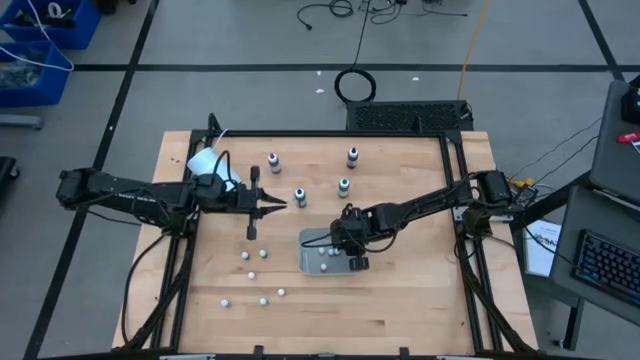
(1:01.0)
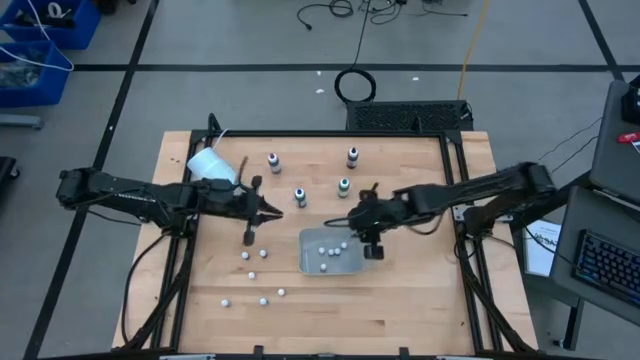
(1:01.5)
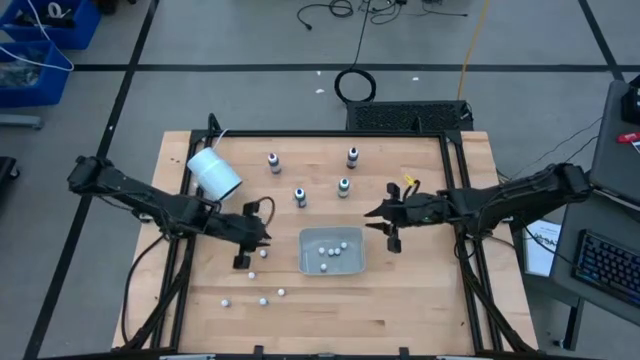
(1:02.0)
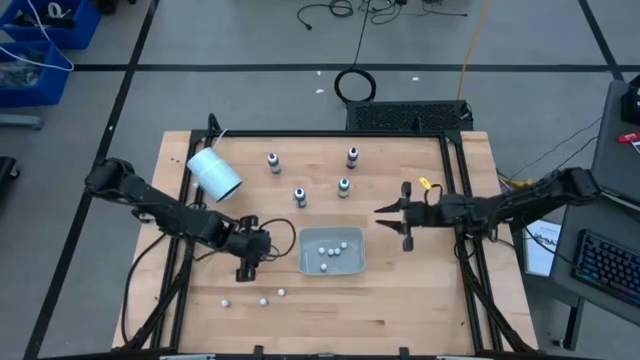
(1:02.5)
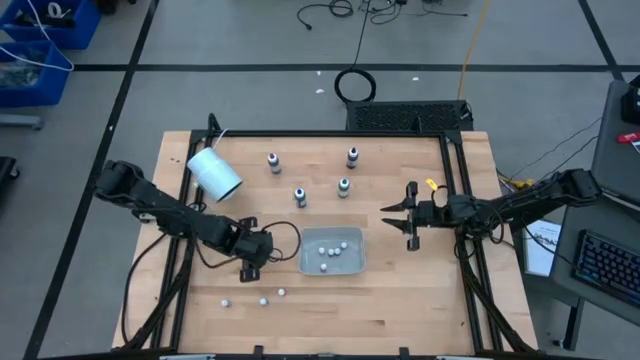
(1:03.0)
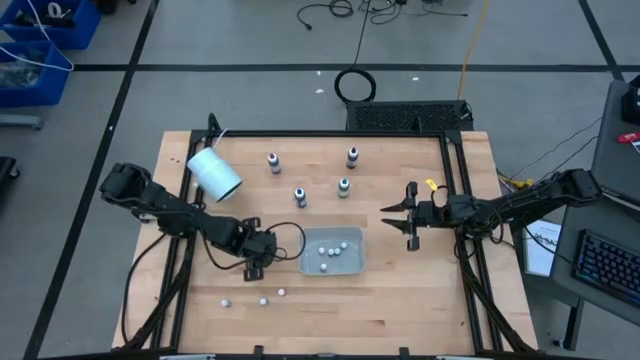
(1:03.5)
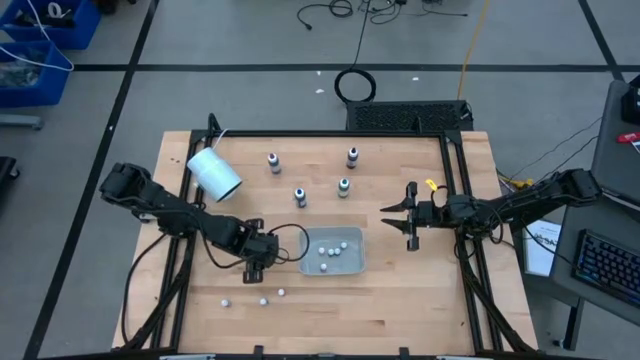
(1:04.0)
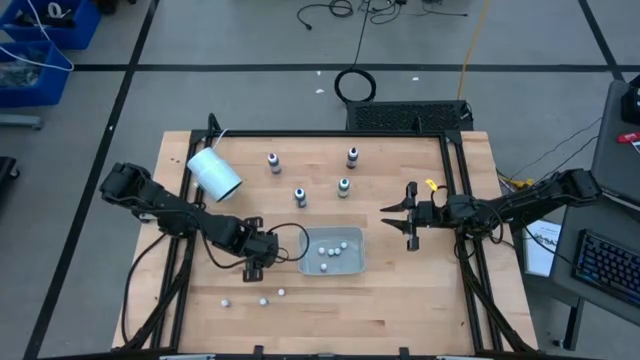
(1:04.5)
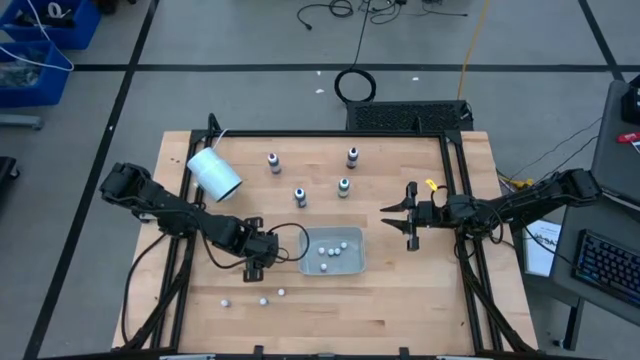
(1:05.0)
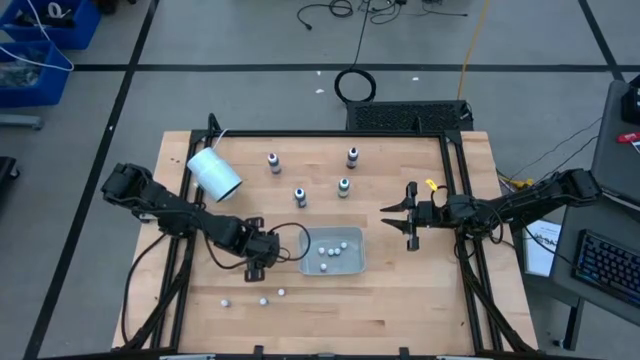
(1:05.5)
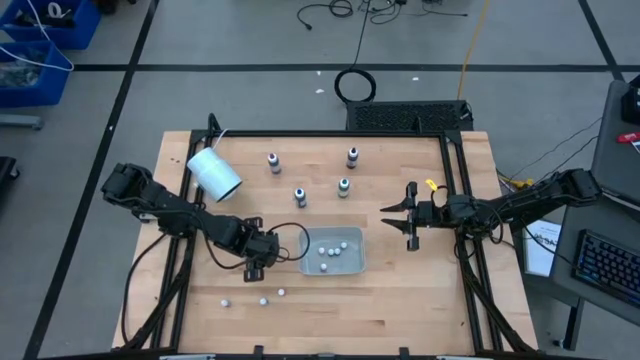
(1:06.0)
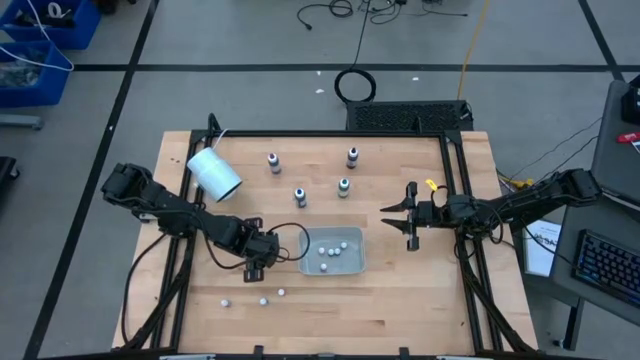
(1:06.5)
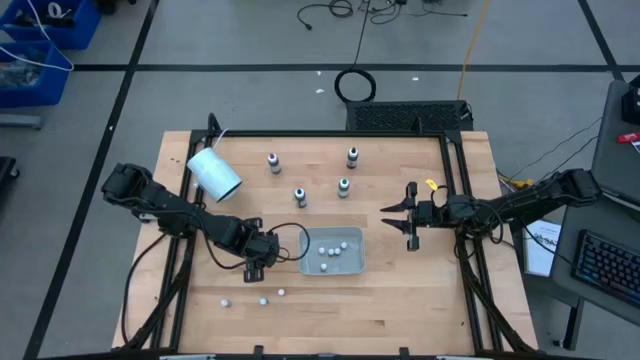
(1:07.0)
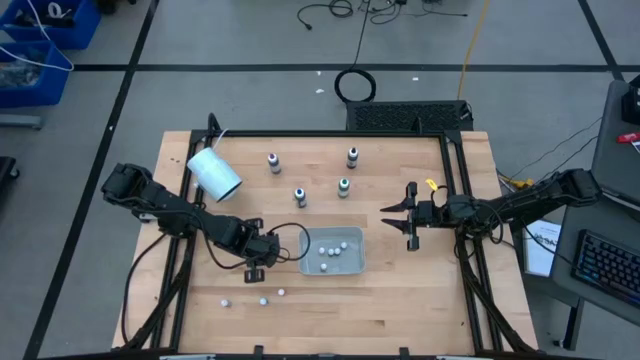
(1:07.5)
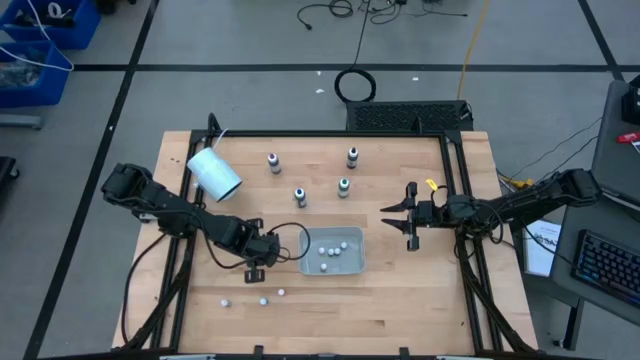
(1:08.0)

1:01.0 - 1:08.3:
Task: Pick & Place food coloring
Put the red food coloring bottle into the bin

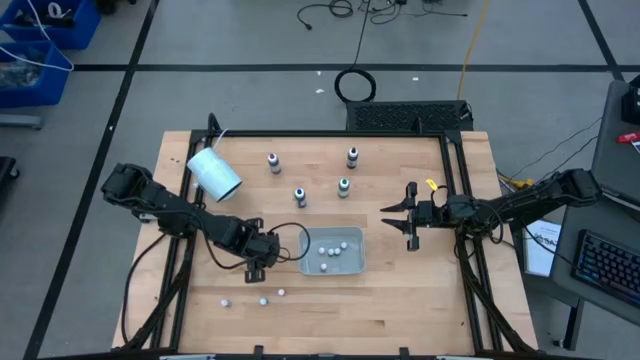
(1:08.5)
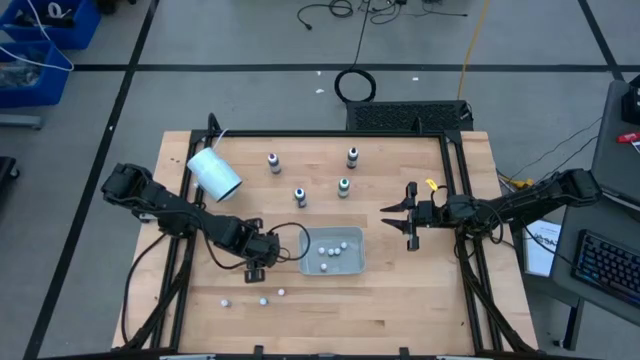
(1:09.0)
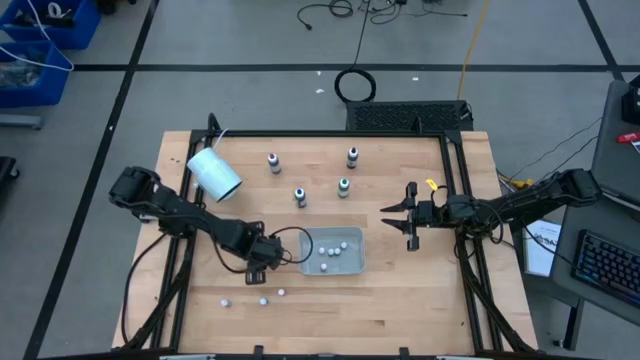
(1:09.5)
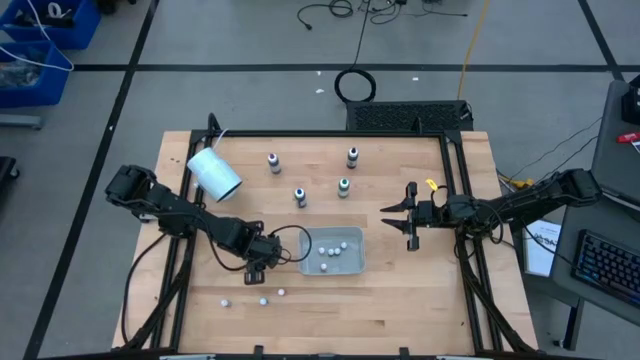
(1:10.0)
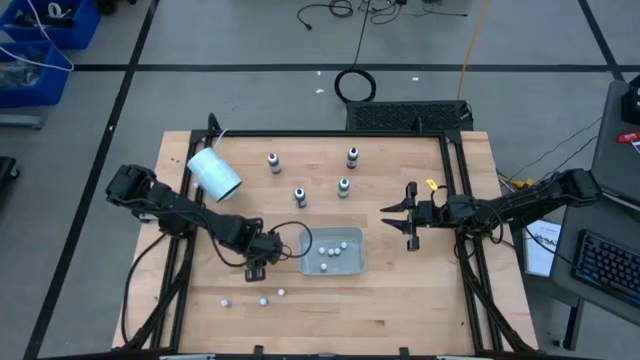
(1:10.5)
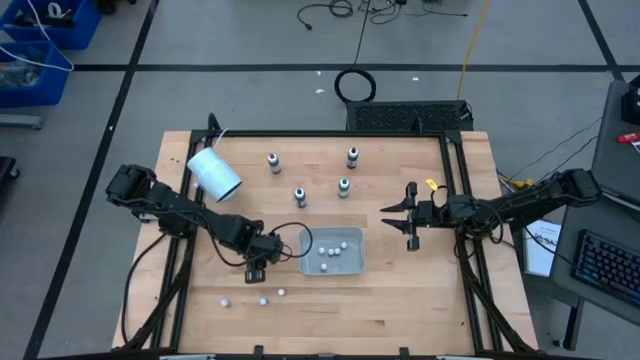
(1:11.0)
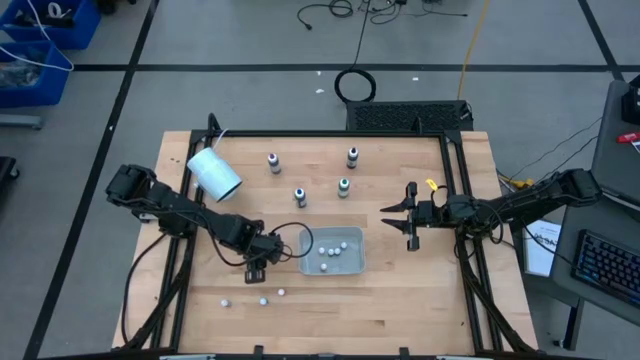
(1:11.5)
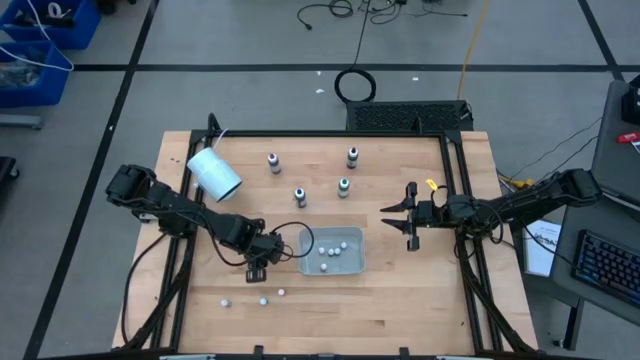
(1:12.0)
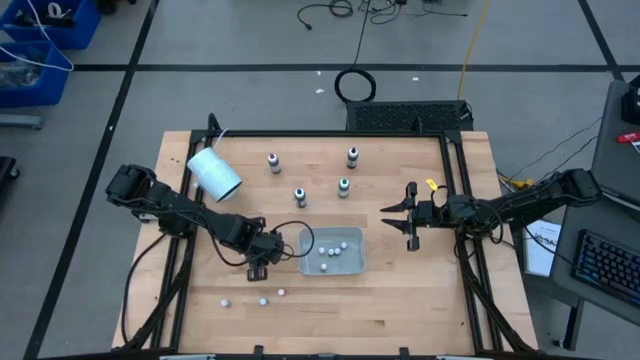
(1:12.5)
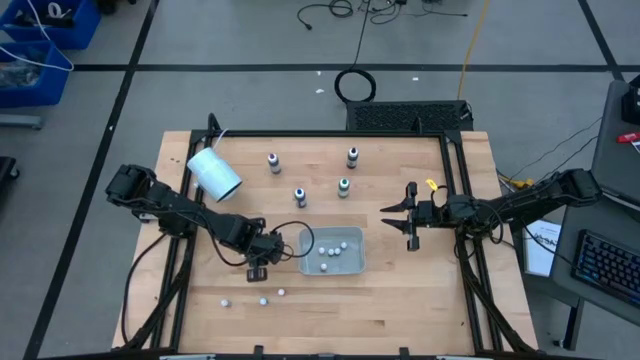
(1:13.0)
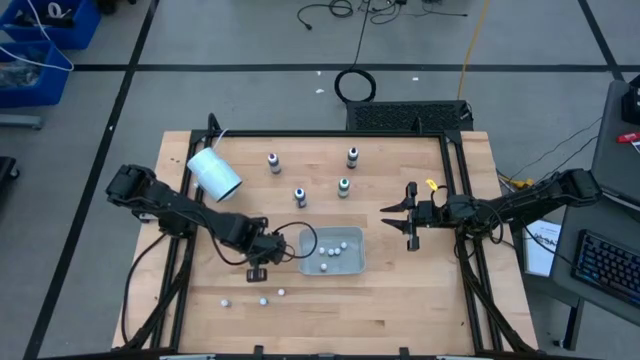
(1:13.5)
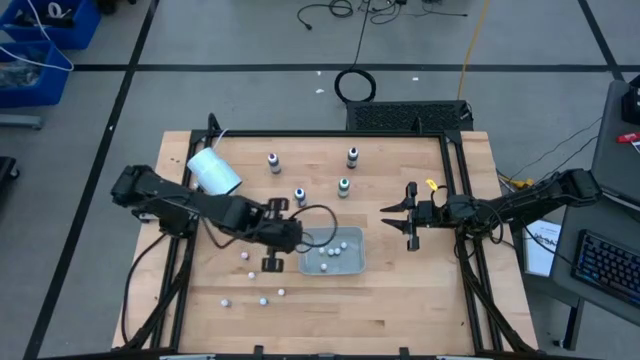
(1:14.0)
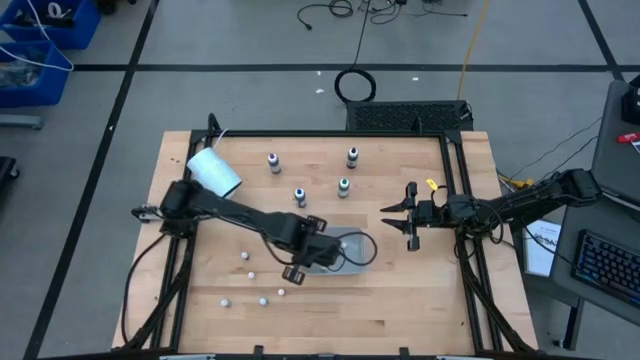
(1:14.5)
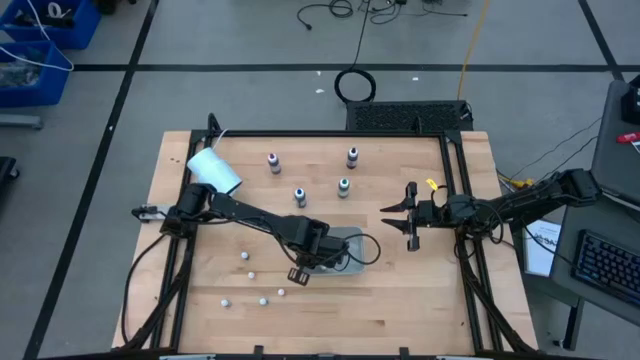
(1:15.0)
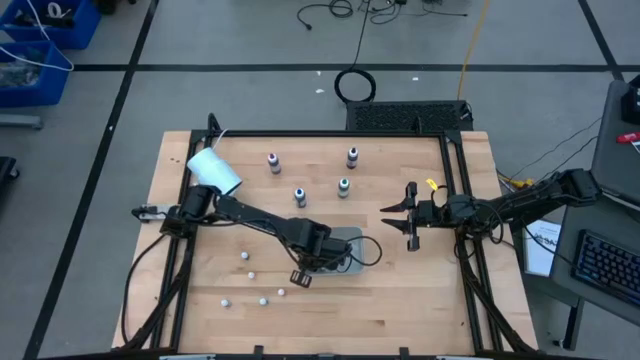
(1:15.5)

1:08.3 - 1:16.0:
Put the red food coloring bottle into the bin

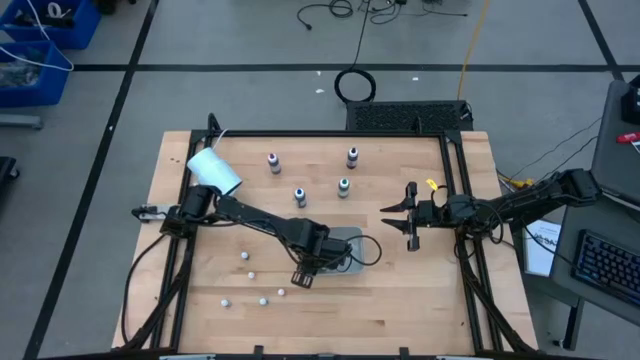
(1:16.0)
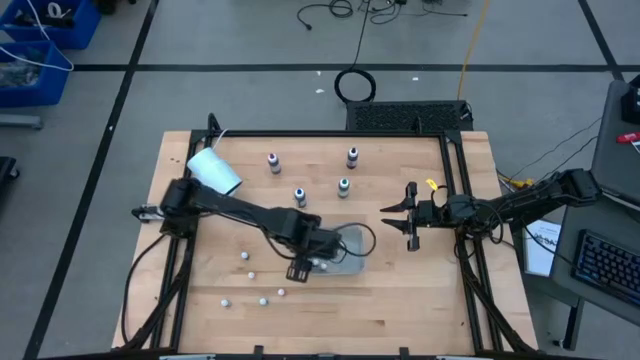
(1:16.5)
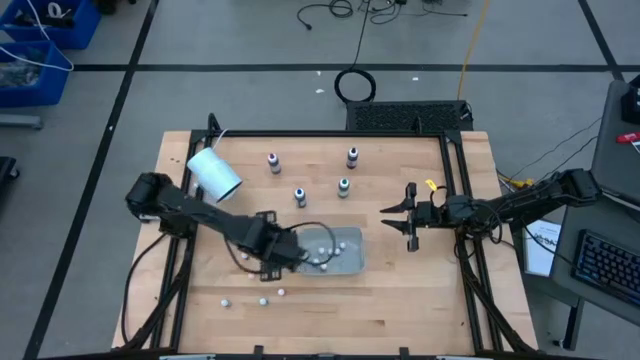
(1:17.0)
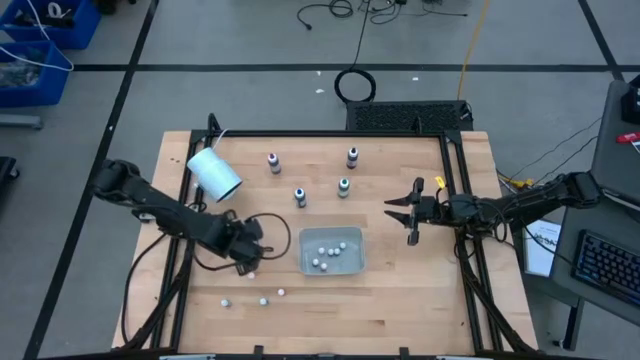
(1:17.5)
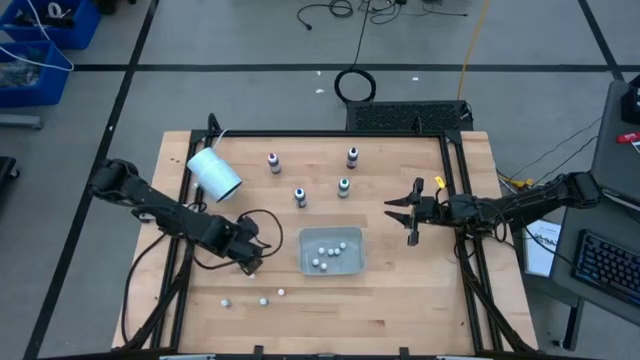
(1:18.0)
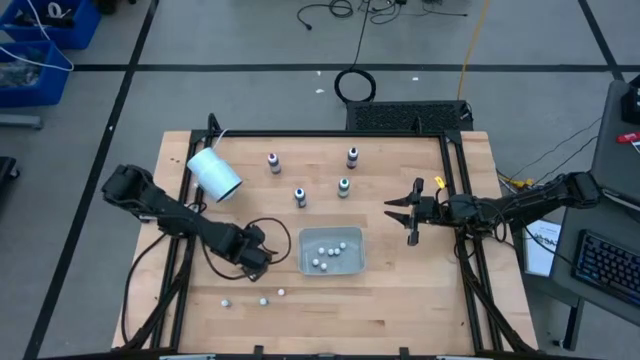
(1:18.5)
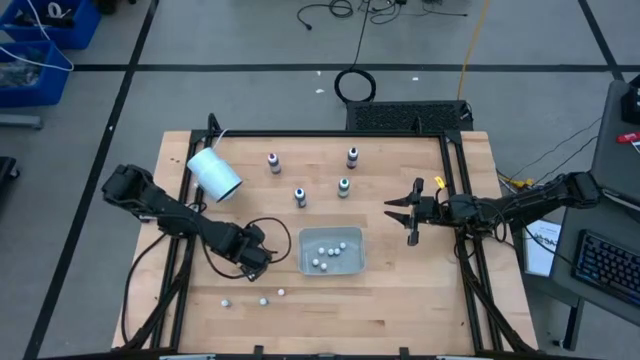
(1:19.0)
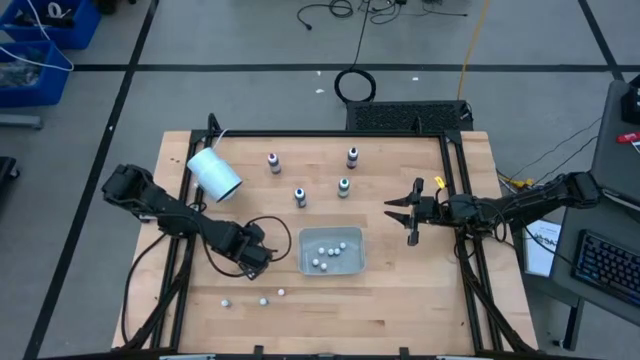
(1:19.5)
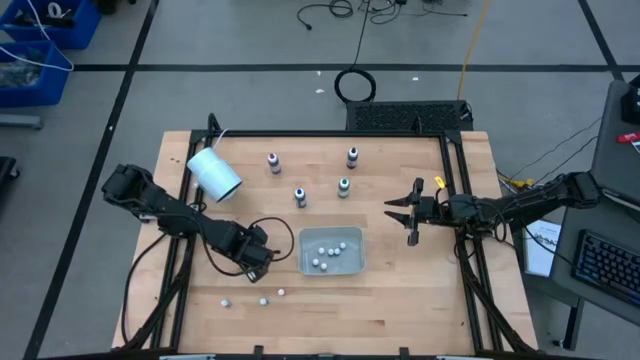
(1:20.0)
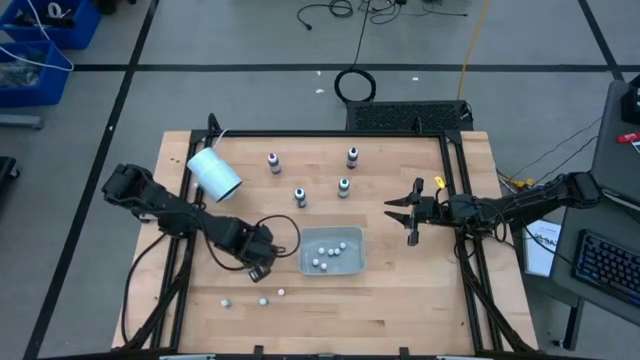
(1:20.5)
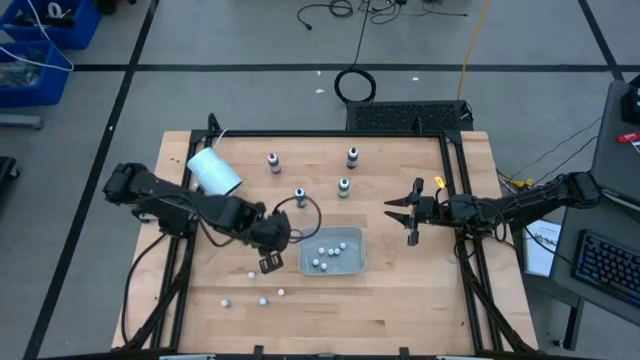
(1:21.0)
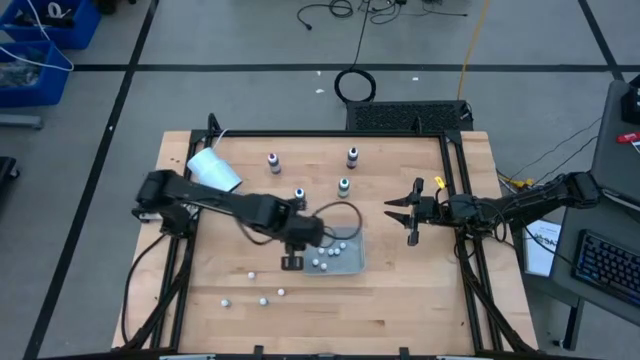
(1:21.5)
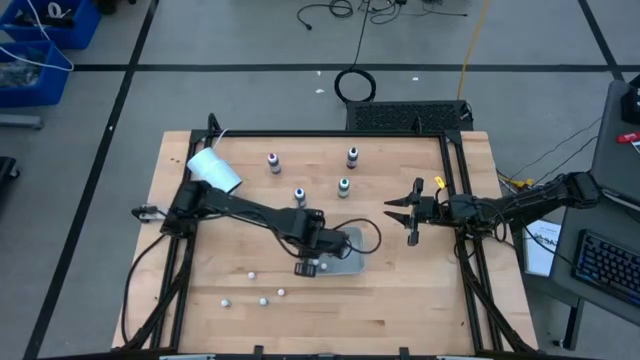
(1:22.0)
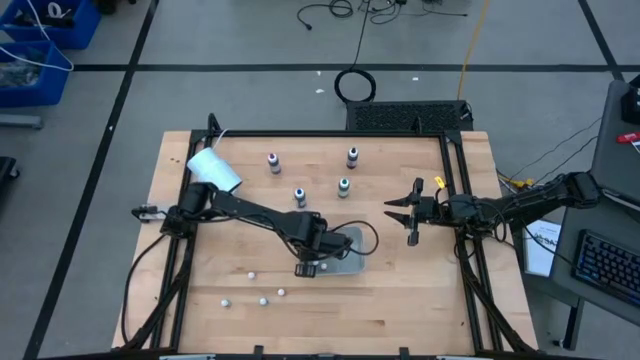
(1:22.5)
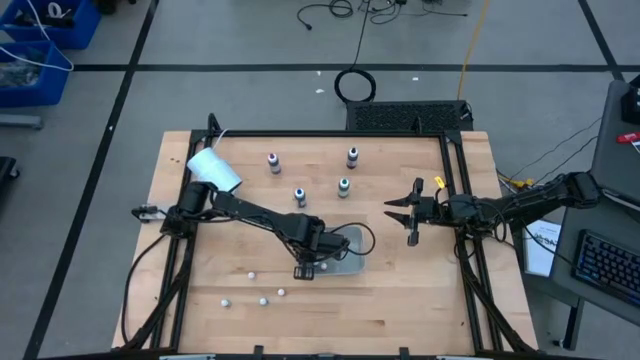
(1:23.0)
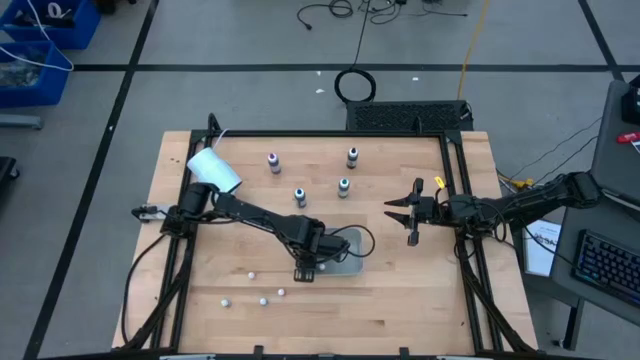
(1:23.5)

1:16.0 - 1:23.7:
Put the purple food coloring bottle into the bin
